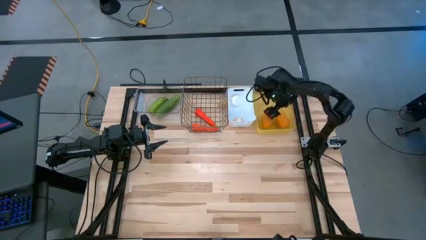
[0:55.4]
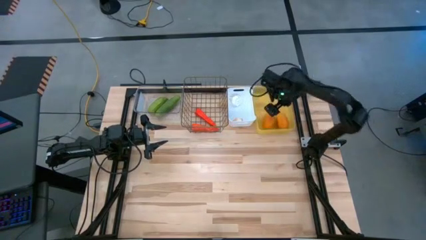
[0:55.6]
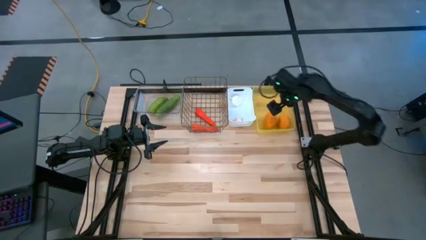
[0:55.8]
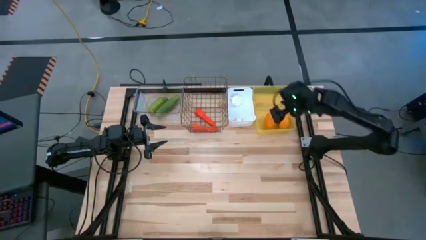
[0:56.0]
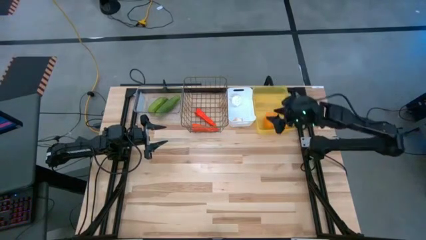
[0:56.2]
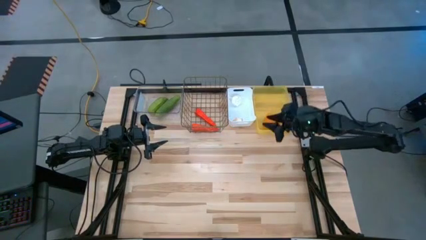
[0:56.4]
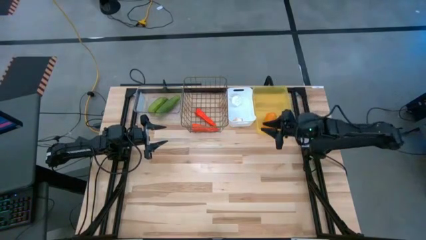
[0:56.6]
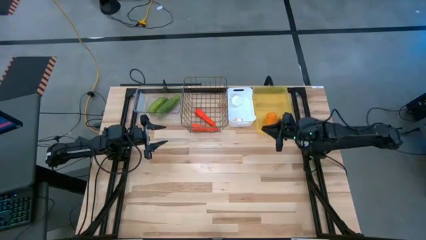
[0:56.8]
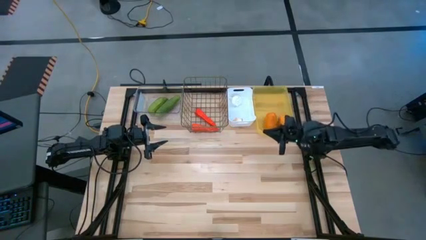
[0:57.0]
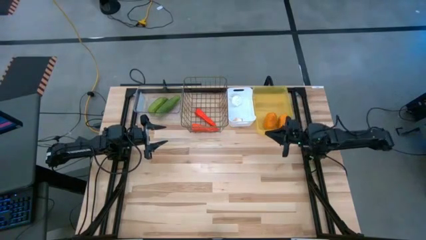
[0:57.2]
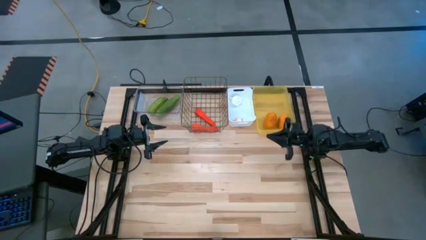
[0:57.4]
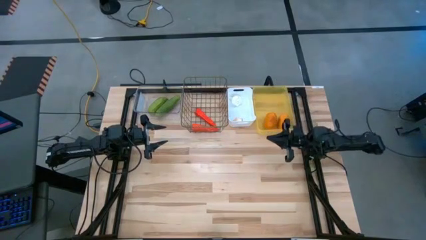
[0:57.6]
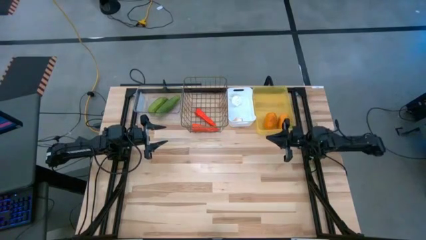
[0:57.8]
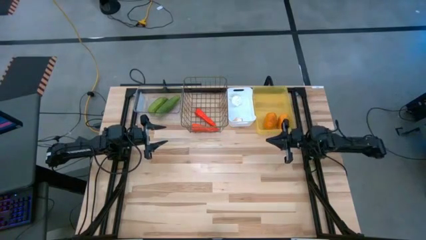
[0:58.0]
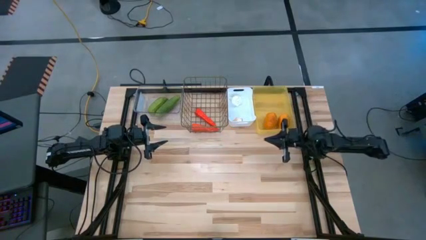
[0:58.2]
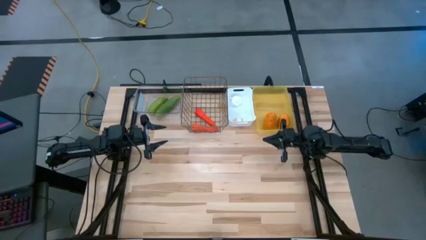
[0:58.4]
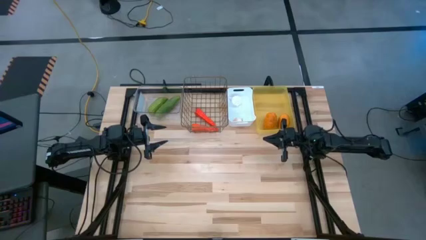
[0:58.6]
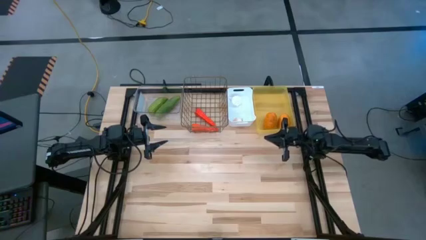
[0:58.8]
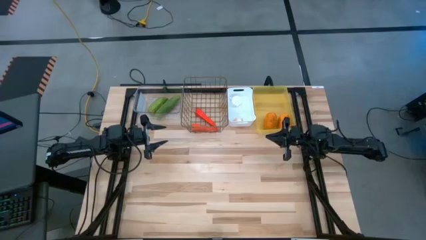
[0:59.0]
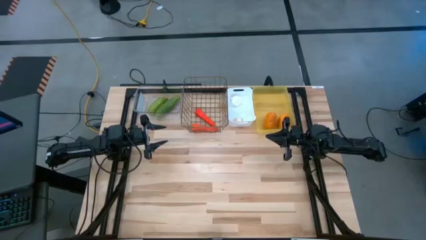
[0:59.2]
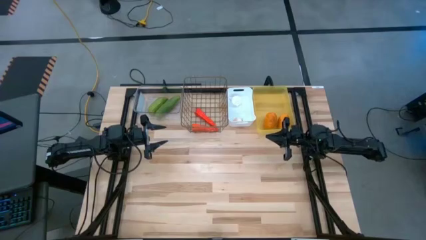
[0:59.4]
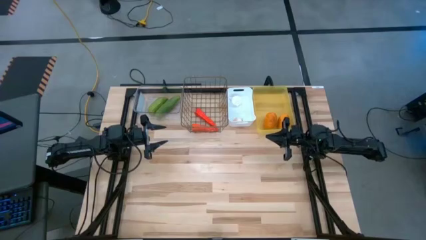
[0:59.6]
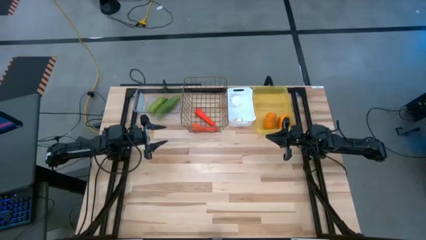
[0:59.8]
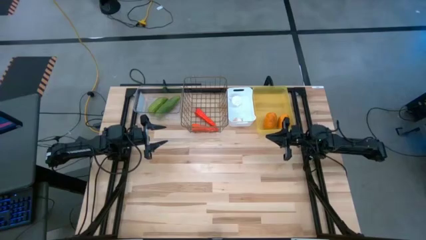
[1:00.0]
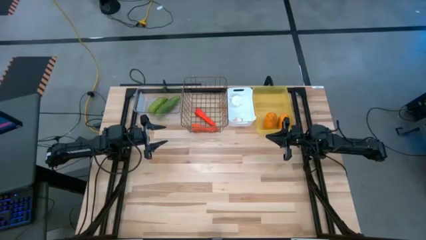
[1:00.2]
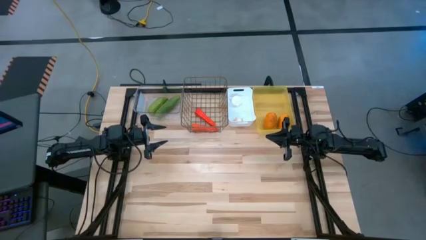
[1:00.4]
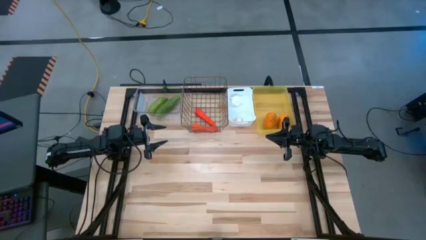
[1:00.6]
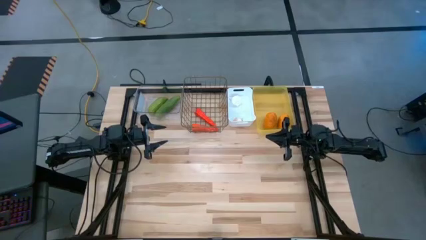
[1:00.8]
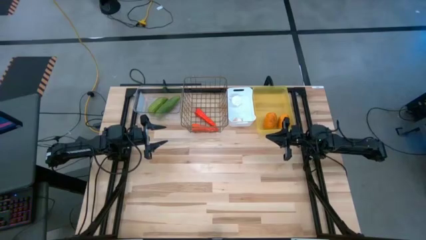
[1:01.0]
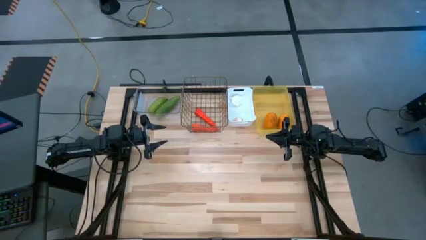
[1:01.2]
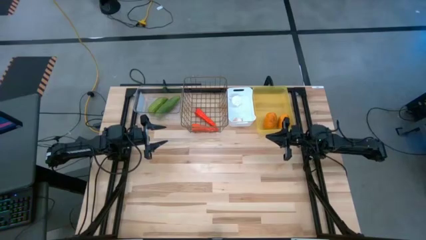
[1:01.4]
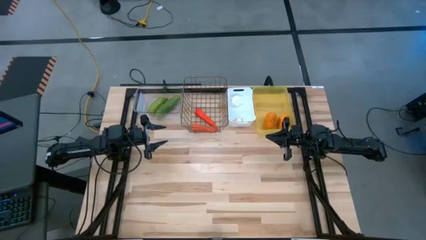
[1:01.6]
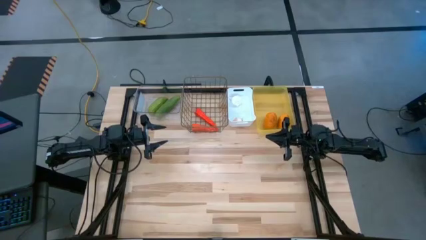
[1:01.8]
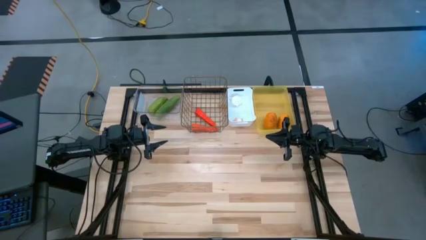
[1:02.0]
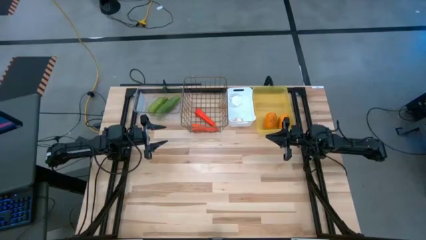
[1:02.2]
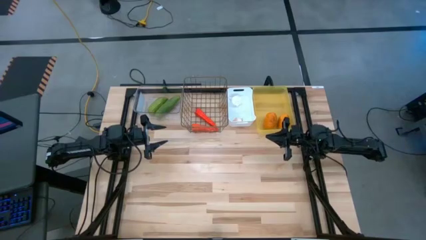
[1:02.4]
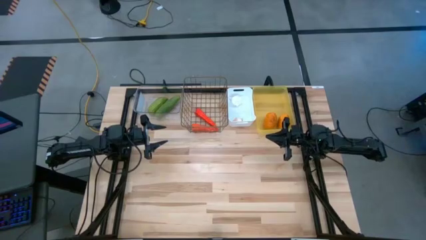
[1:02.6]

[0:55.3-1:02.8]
Task: Sort produce into baskets
Return to Home Position

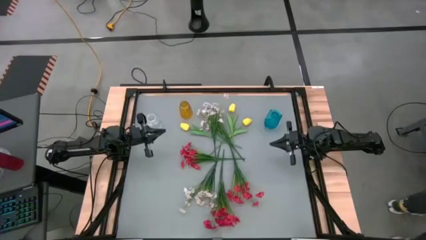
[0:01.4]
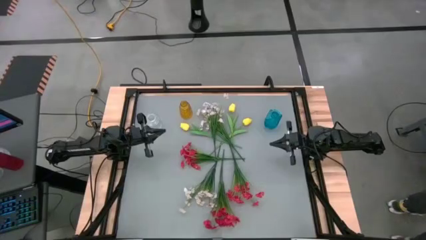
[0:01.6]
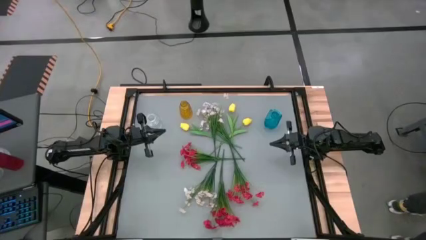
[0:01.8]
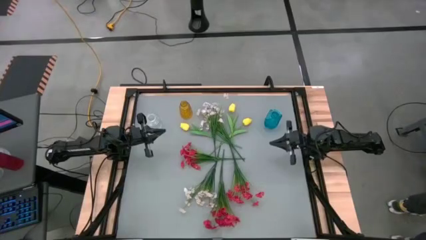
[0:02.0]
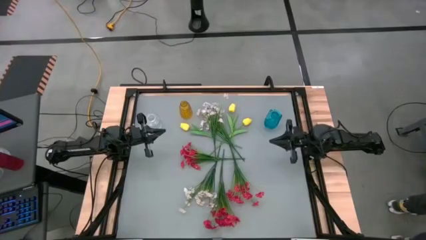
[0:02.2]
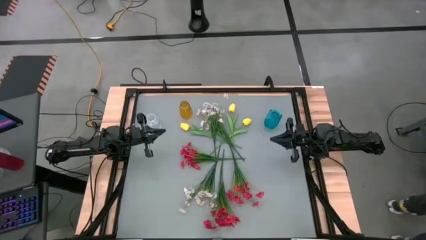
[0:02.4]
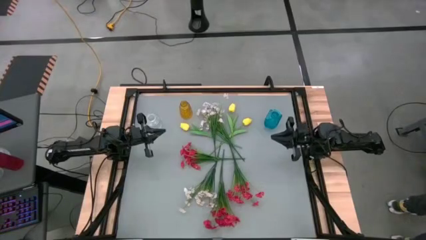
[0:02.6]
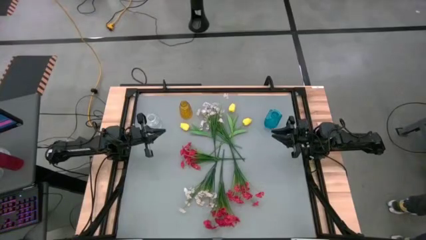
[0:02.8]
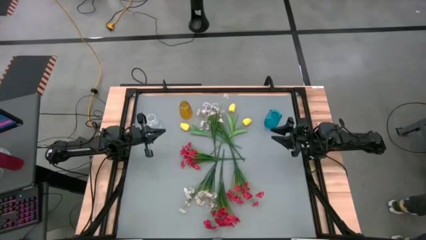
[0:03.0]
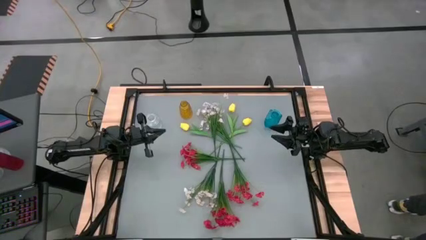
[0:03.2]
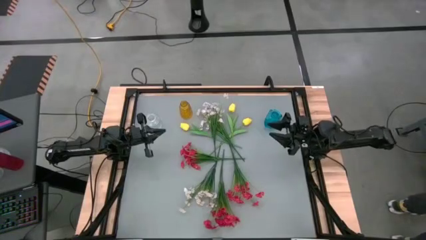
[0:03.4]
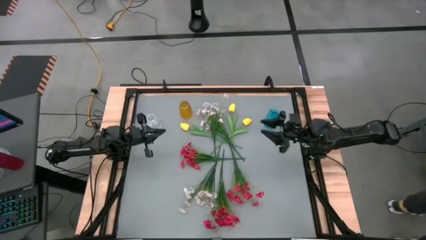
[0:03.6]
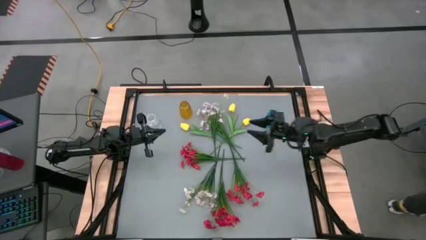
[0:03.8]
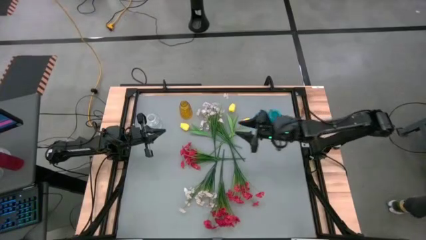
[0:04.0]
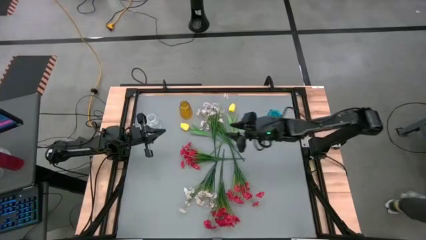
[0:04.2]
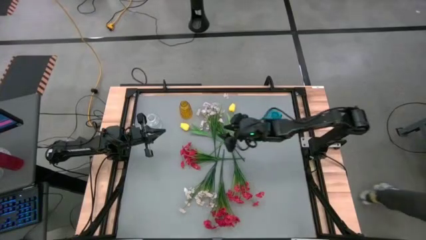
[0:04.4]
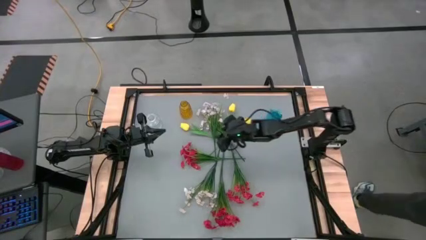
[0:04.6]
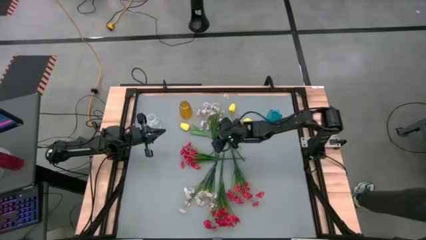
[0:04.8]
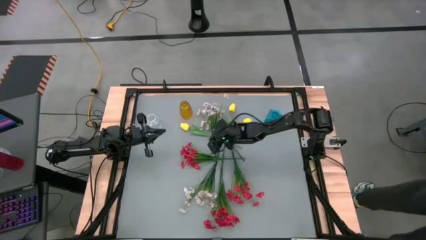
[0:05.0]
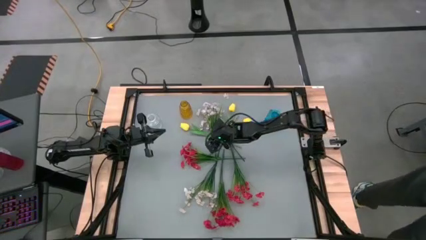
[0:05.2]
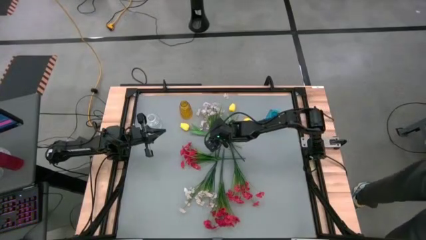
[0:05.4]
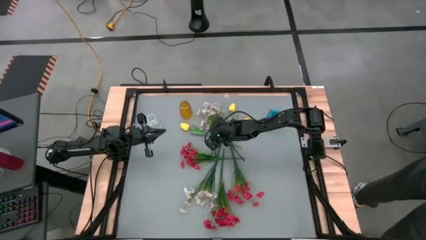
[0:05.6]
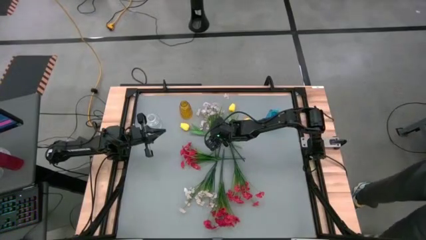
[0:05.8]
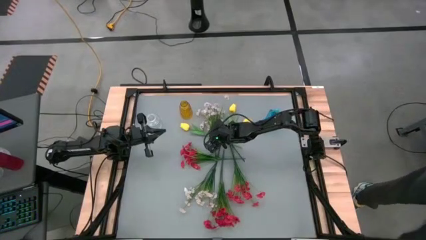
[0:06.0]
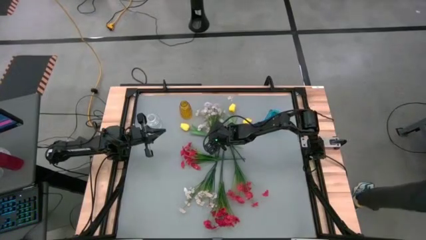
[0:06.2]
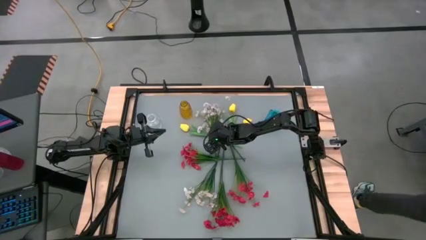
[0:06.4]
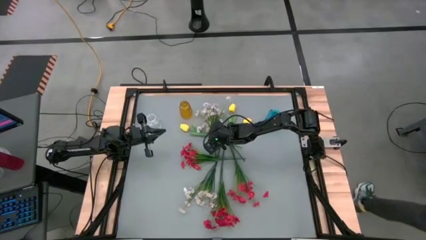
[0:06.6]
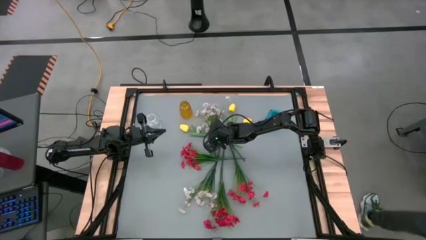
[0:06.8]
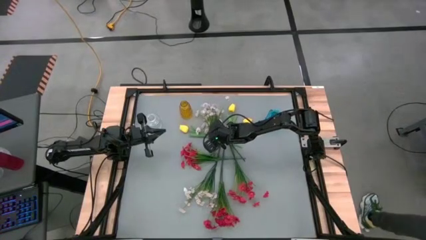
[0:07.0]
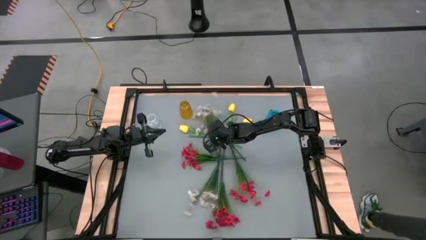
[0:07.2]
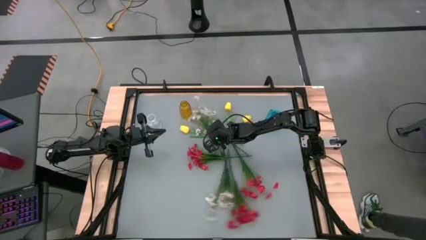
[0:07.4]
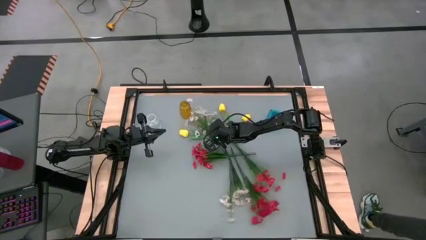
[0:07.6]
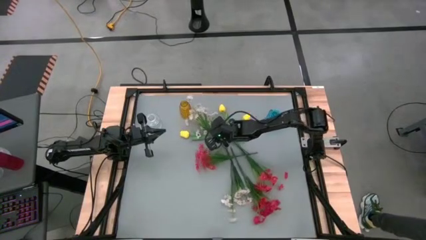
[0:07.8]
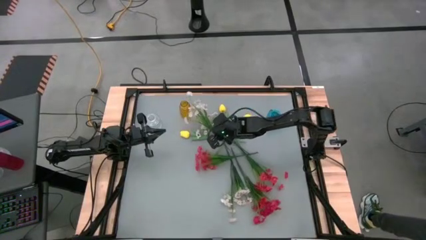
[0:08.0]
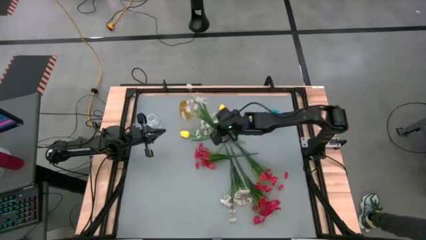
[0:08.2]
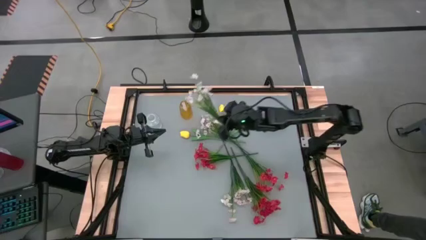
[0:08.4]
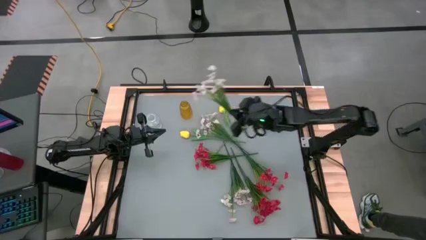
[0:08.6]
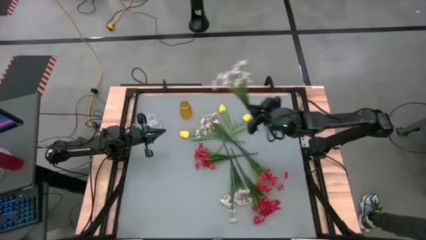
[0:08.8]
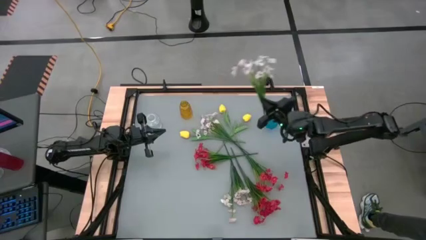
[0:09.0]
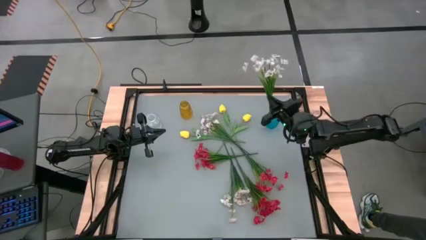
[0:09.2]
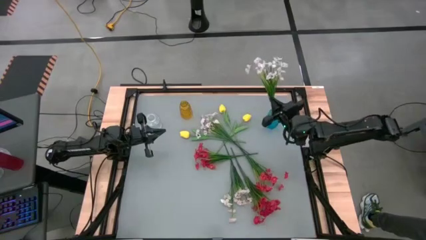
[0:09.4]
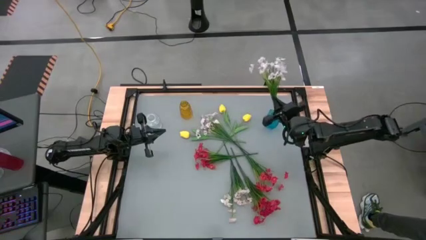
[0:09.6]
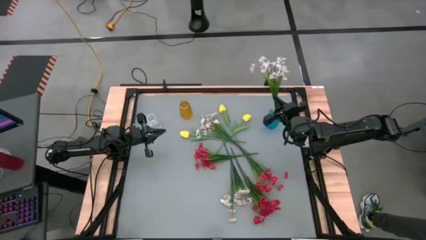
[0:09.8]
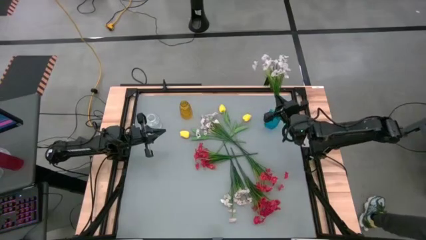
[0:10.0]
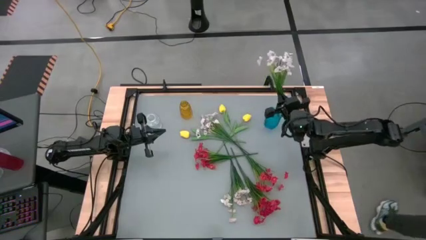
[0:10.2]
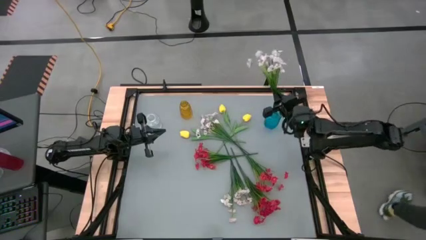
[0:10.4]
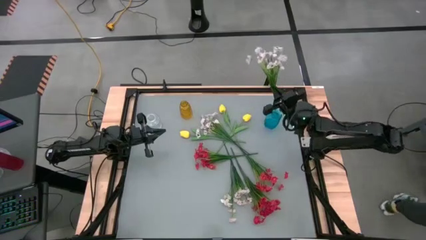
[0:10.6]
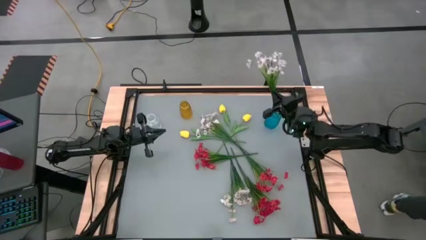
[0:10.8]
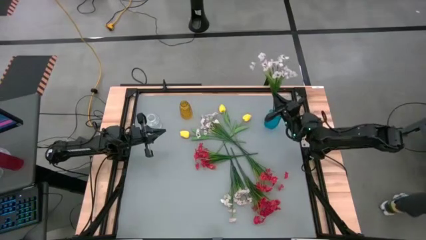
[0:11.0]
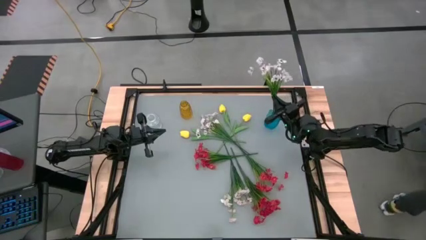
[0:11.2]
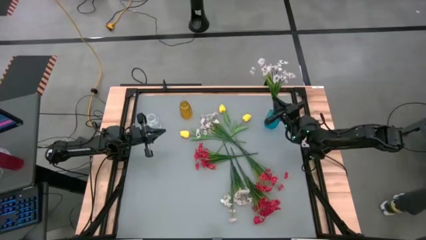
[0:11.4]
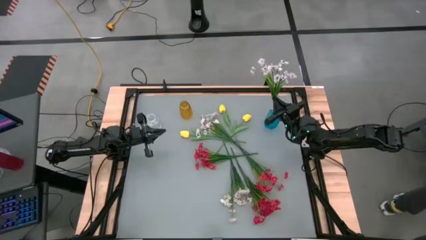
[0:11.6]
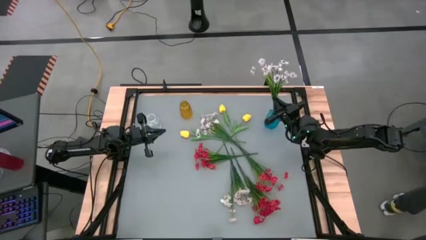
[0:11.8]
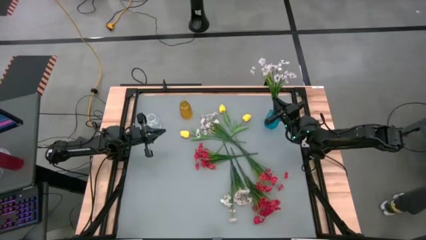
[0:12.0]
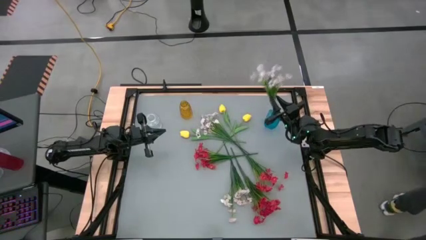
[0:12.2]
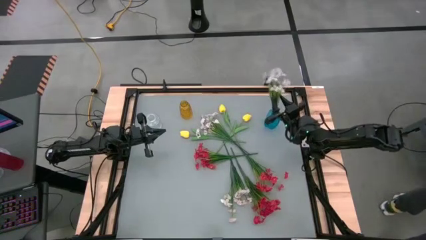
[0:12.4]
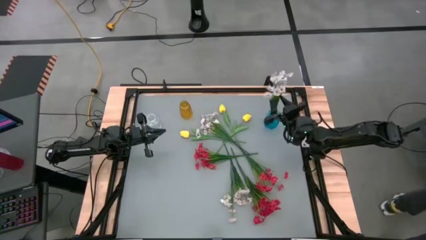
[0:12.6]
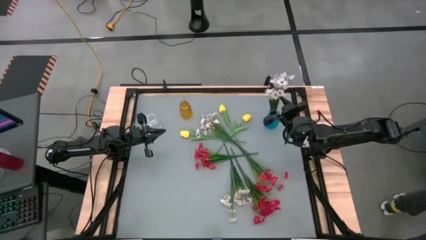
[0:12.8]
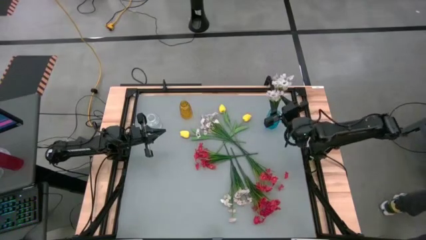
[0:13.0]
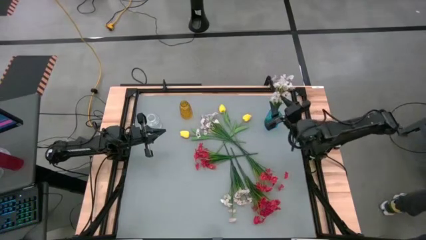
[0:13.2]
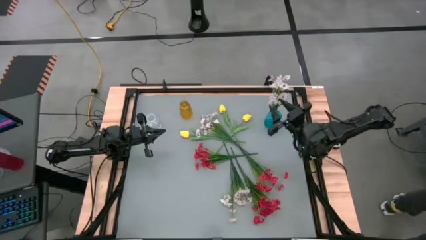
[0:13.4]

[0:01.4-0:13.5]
Task: Sort flowers into vase by color
Put the top left white flowers into the blue vase
